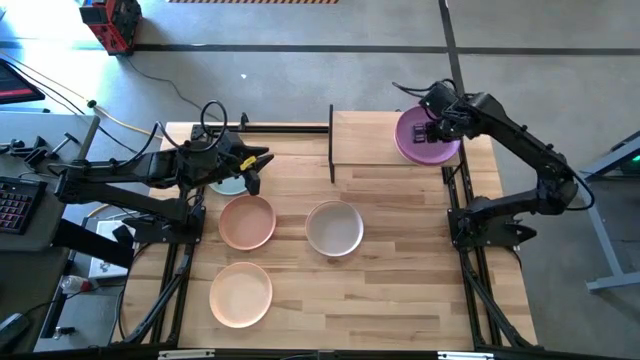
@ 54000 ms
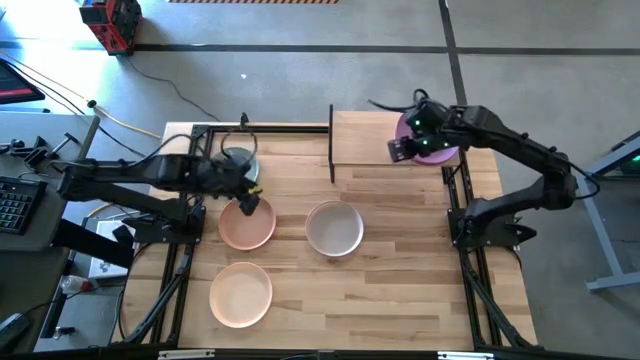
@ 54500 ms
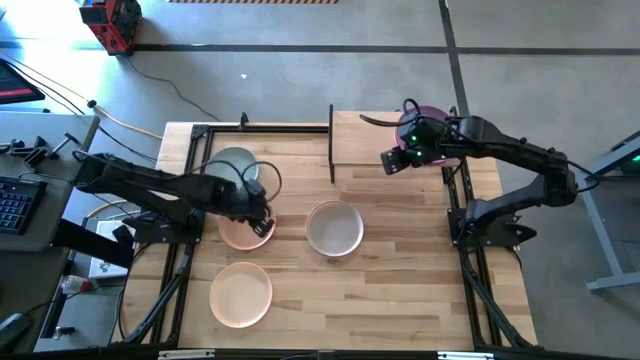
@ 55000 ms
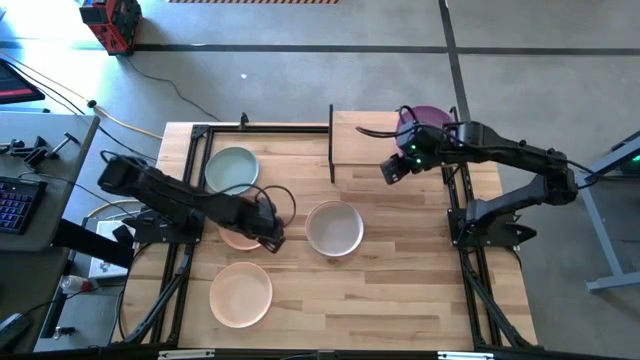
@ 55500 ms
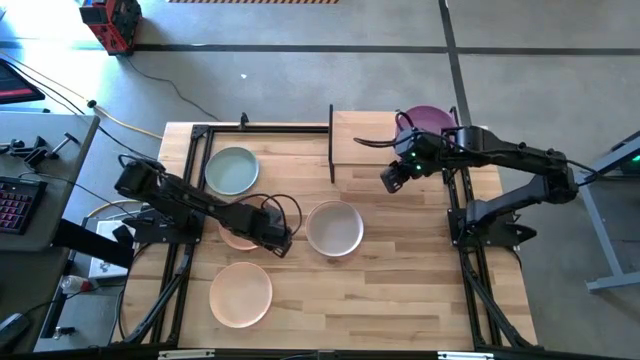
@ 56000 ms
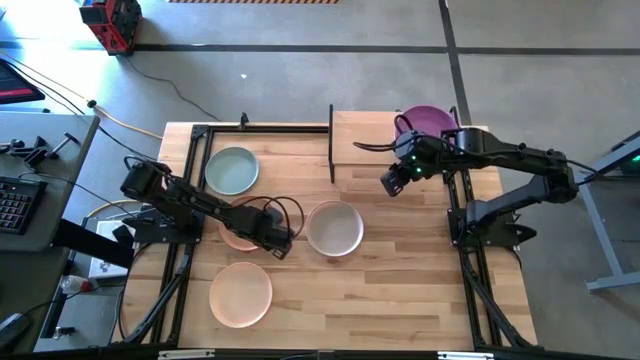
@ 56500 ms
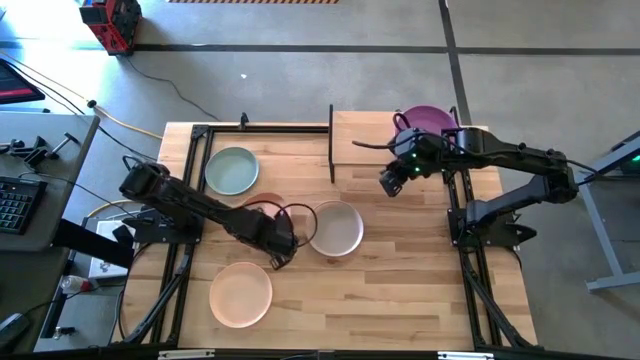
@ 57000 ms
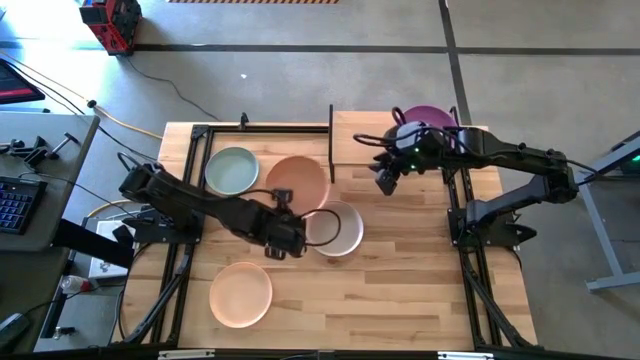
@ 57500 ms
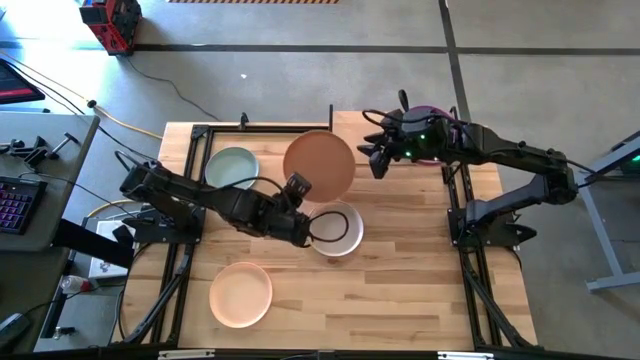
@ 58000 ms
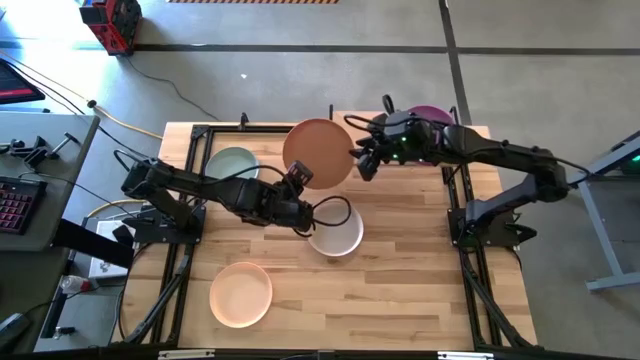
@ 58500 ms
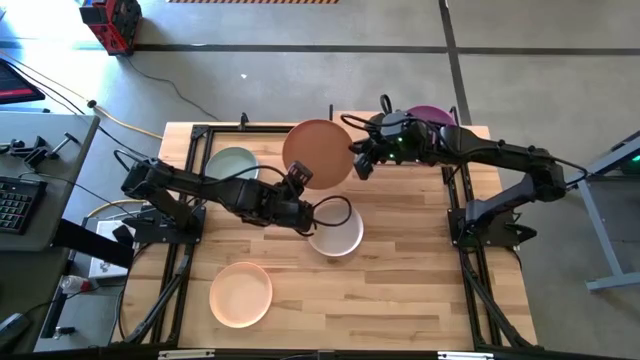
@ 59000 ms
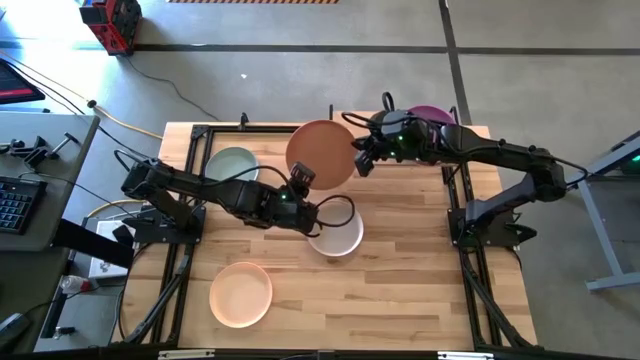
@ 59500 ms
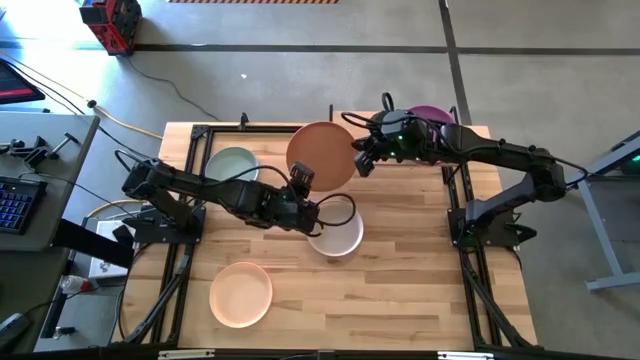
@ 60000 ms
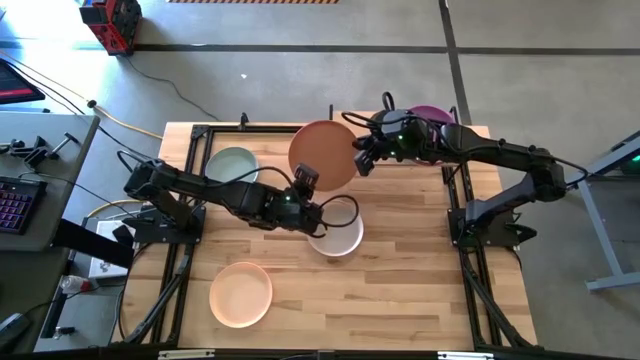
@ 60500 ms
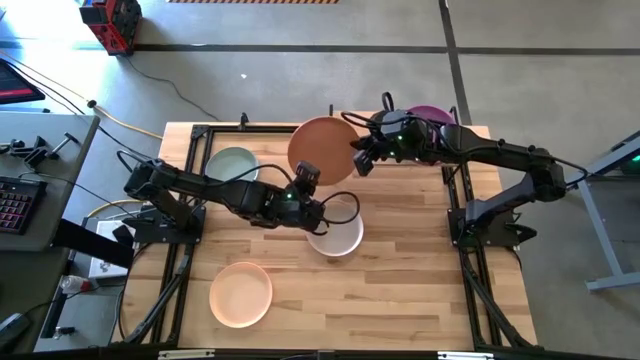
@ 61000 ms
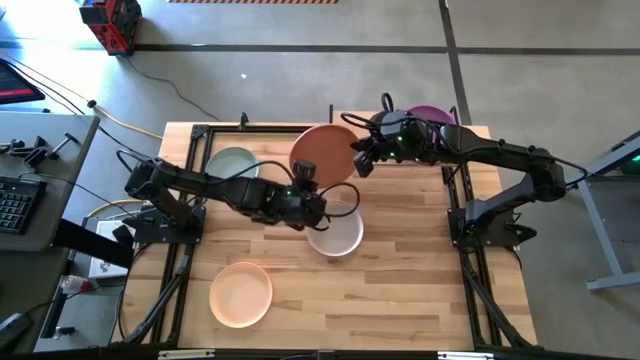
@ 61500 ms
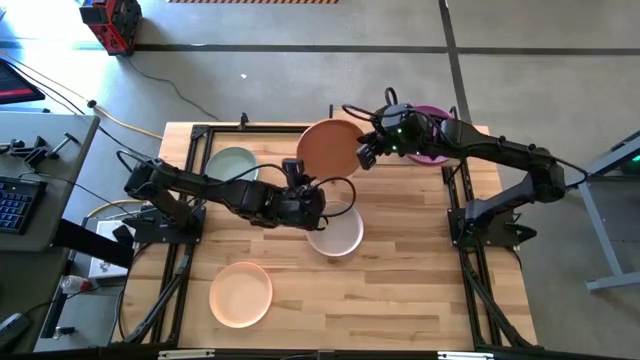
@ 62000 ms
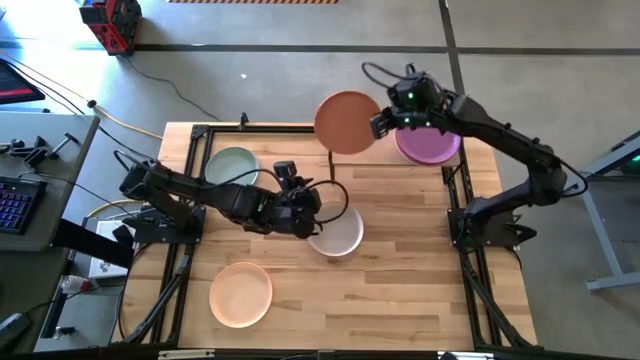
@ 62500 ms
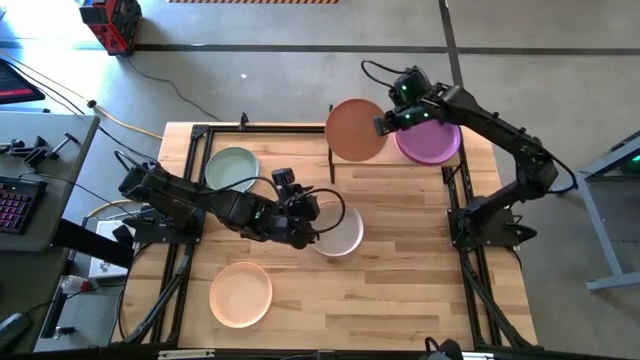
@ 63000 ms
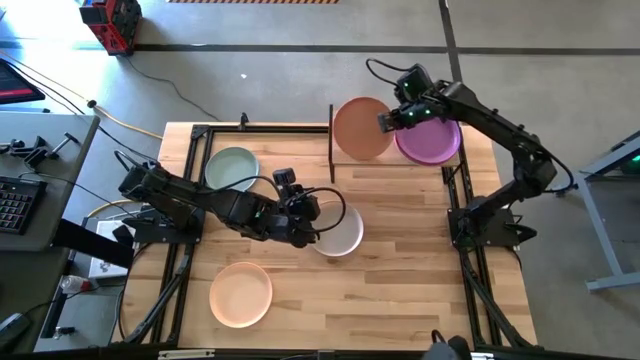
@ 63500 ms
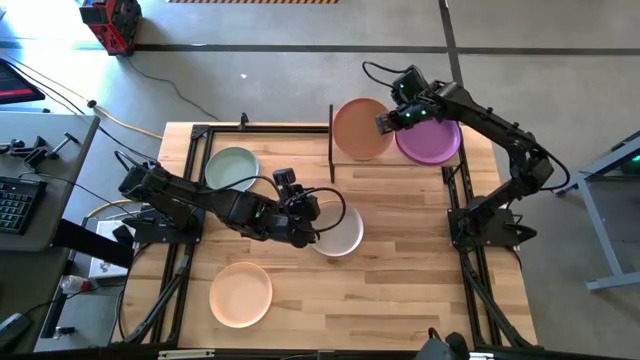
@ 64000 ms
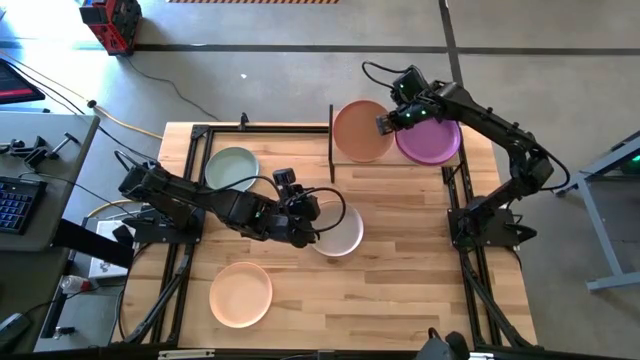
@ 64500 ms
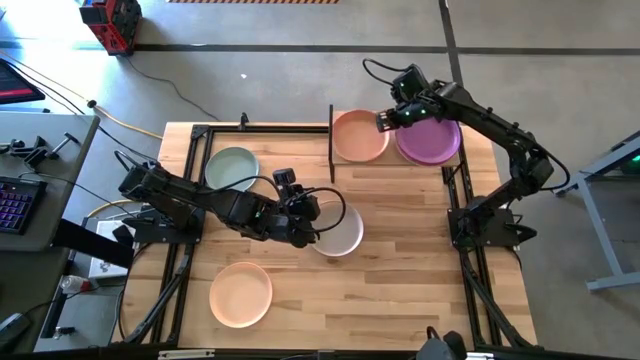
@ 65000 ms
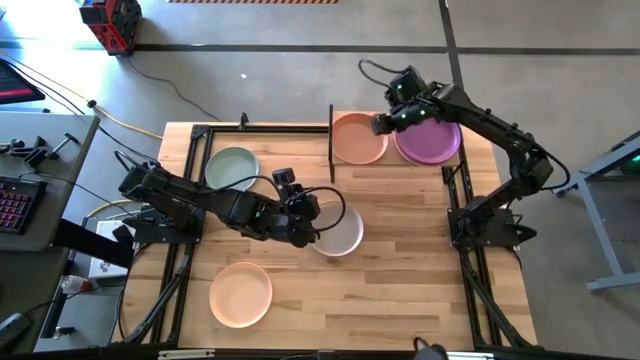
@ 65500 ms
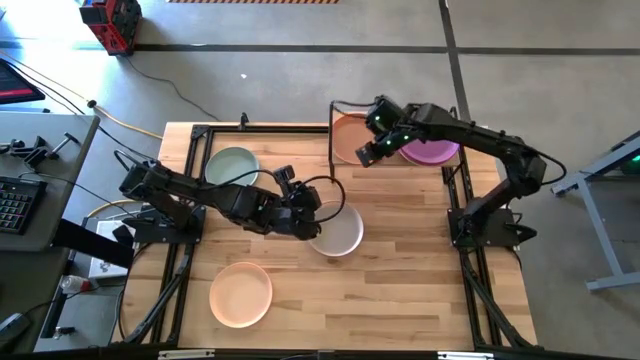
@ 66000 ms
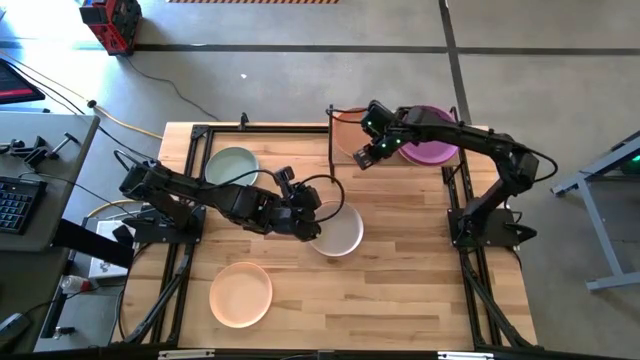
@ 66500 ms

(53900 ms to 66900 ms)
Task: Place and stack plates onto a shelf
Put the brown plate on the shelf

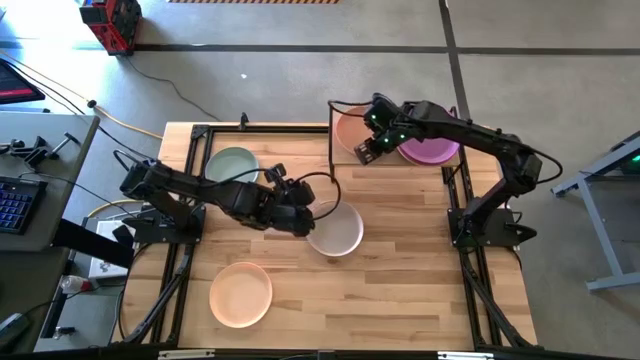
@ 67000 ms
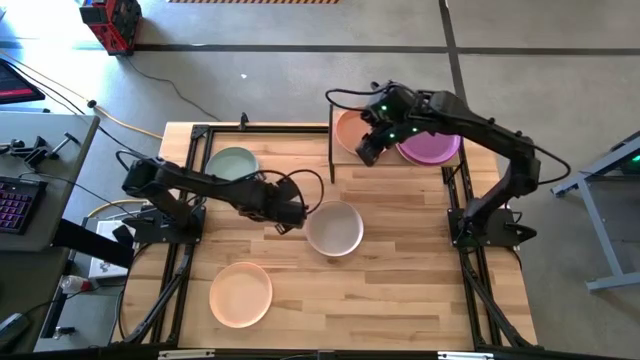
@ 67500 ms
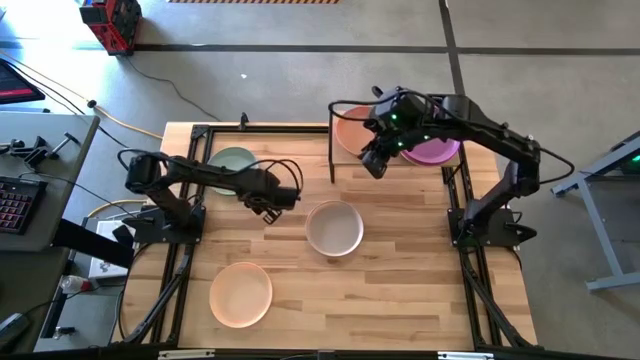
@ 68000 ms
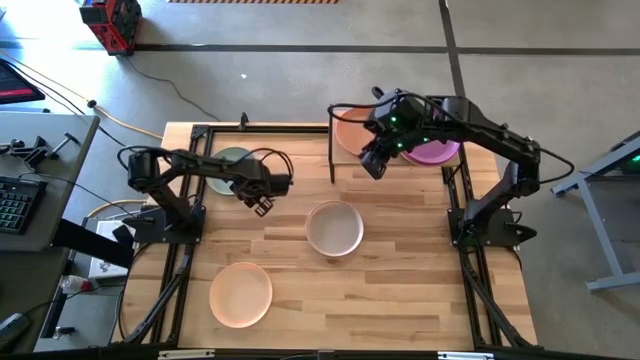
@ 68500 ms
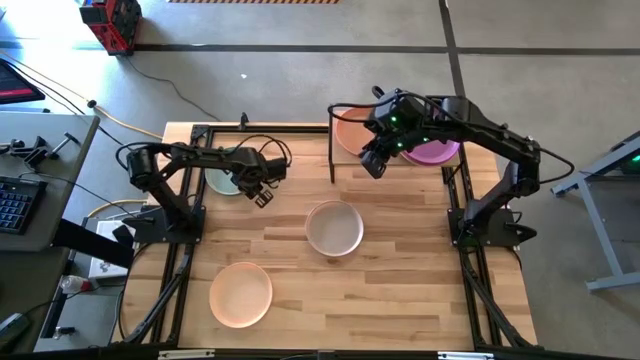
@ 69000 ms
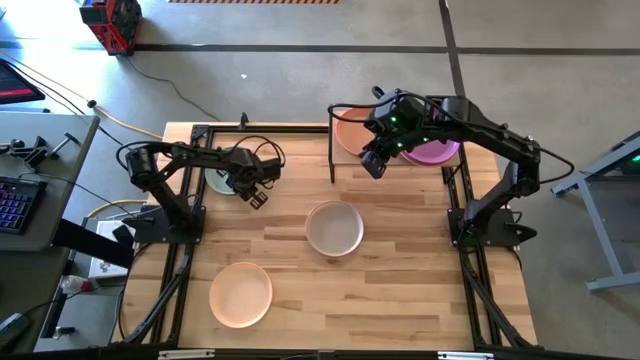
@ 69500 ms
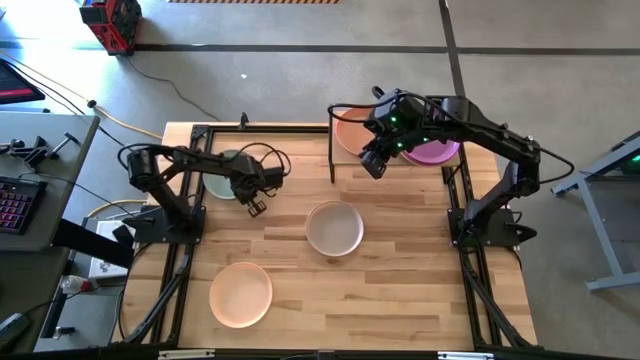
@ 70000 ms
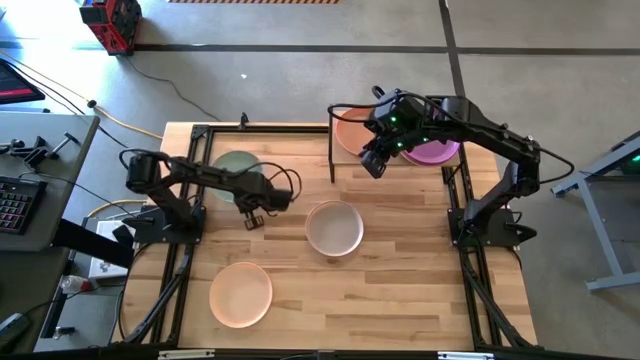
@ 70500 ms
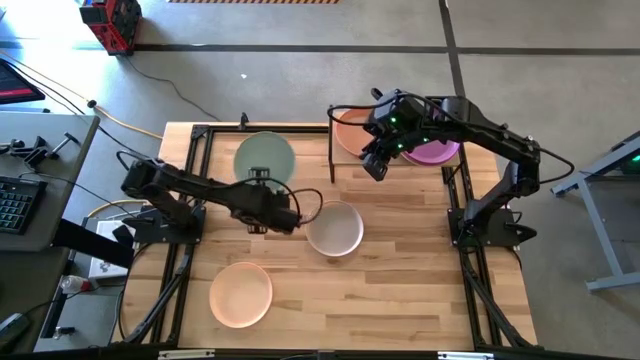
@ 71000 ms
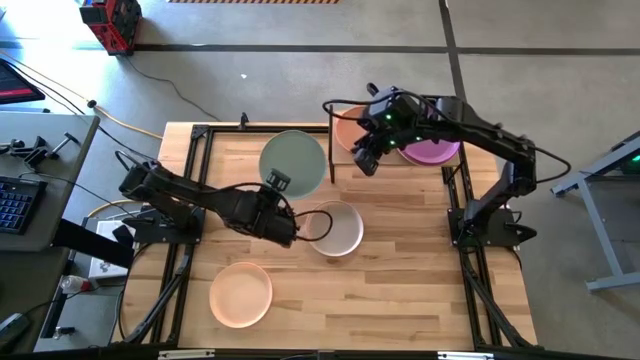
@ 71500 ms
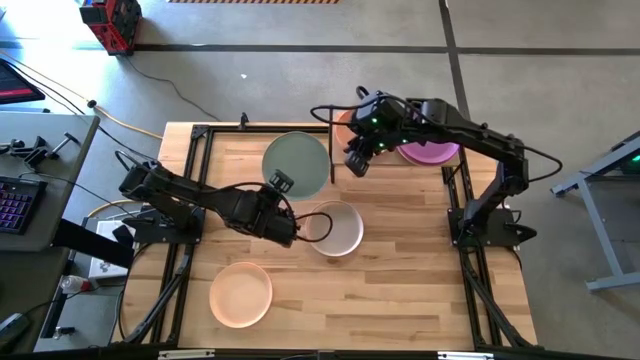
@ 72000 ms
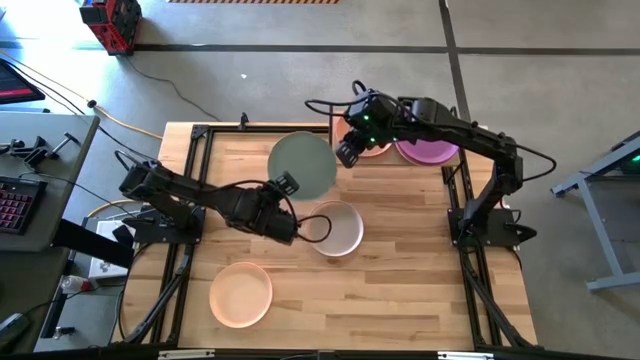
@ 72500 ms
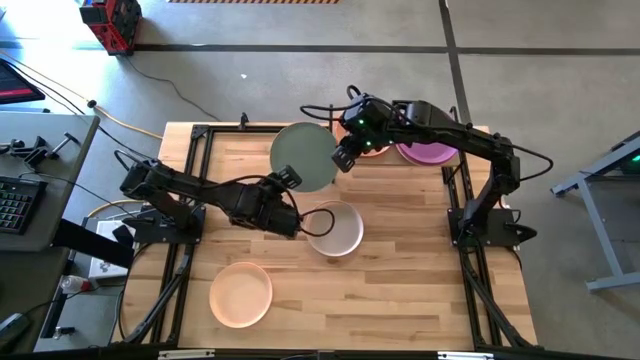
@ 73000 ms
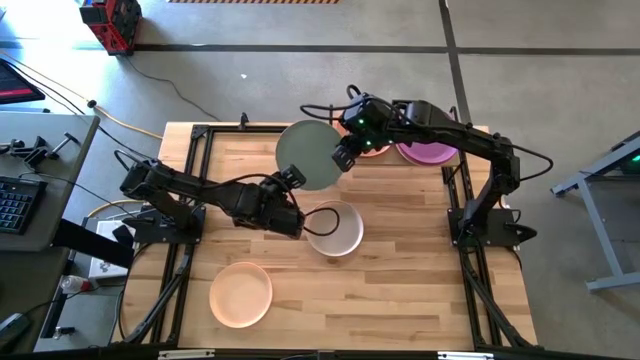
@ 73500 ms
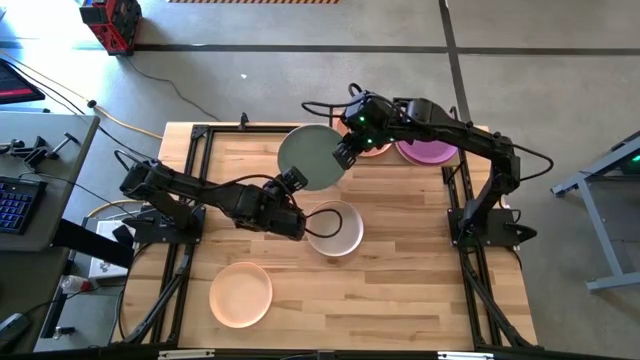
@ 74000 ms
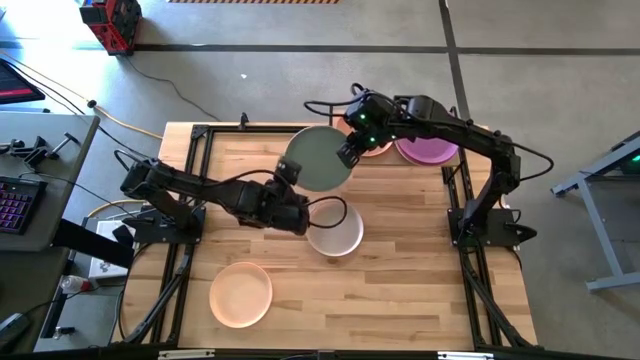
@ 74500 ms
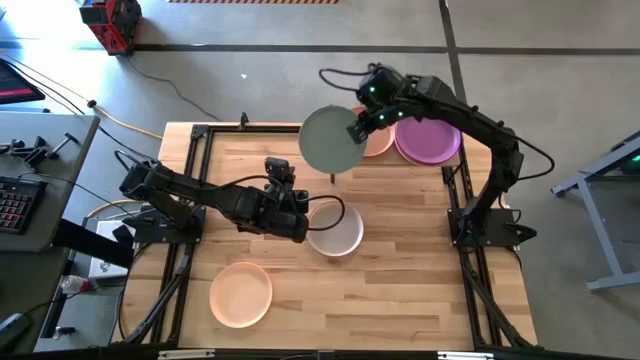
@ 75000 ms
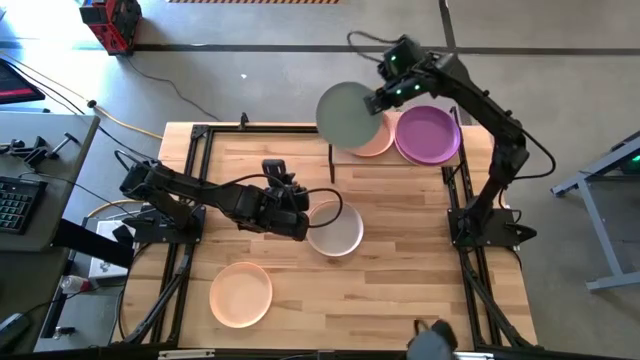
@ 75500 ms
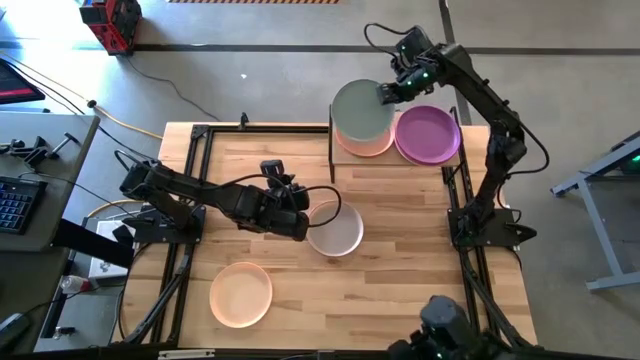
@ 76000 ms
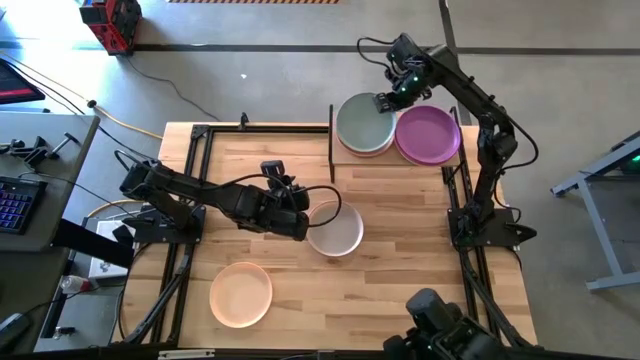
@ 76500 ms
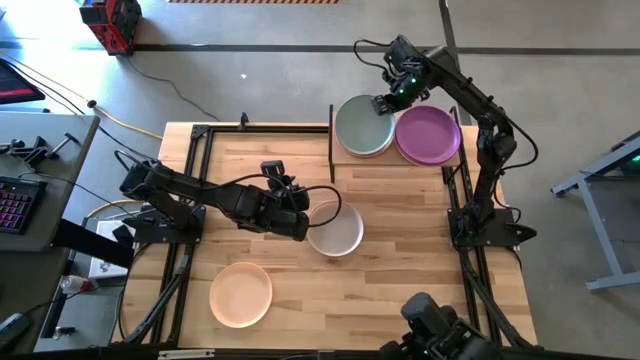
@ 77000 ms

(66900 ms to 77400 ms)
Stack the blue plate on top of the brown plate on the shelf
